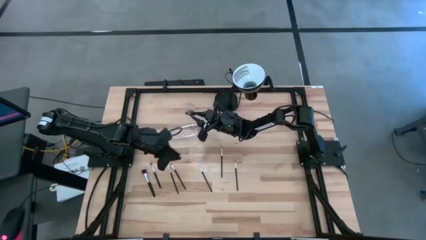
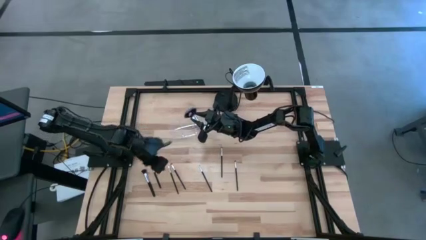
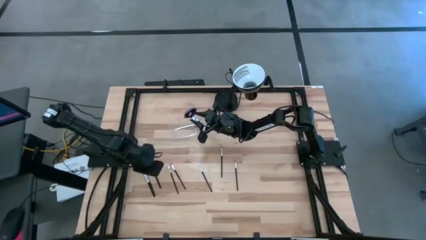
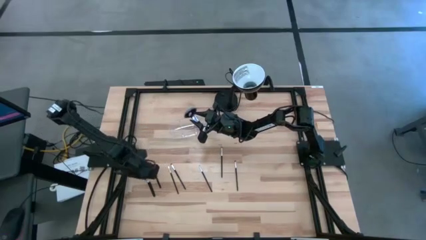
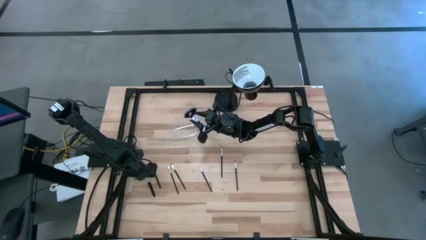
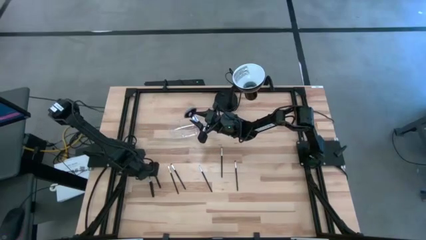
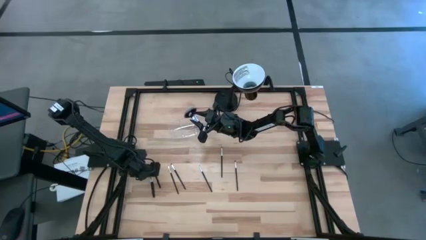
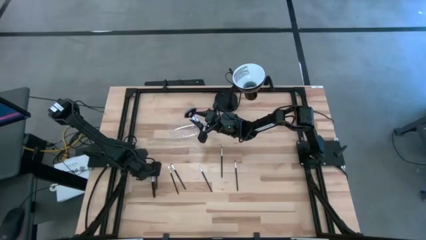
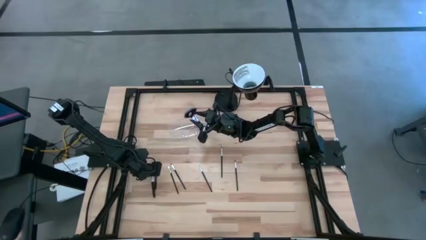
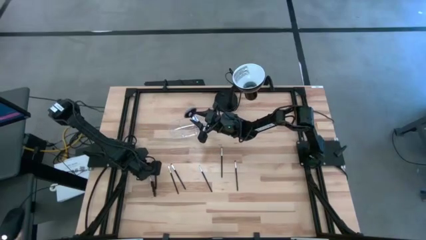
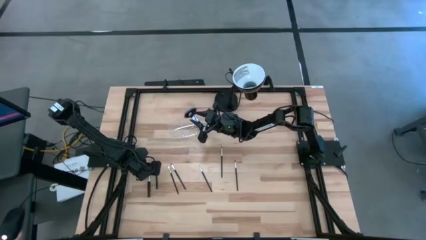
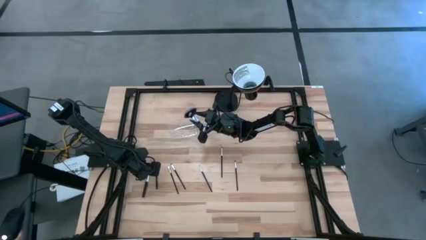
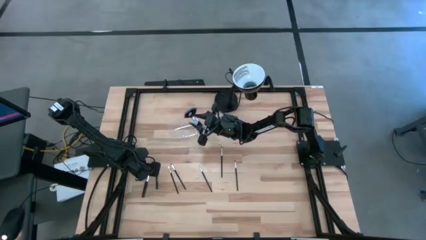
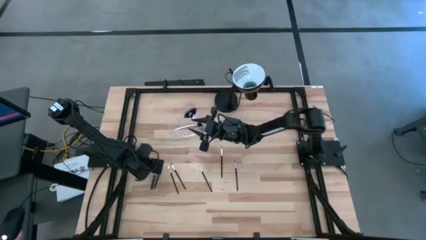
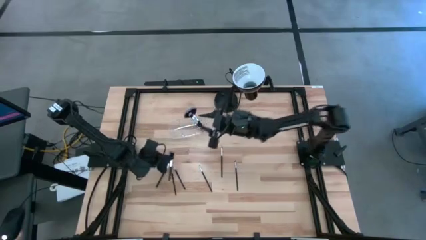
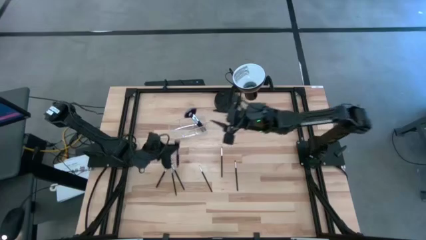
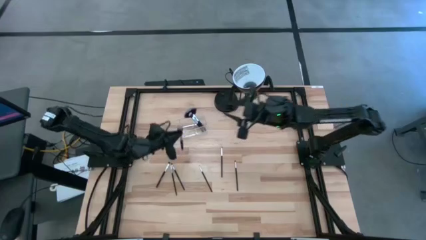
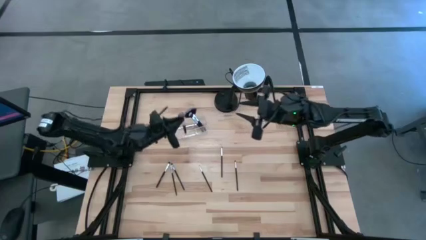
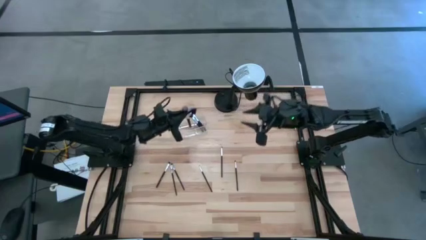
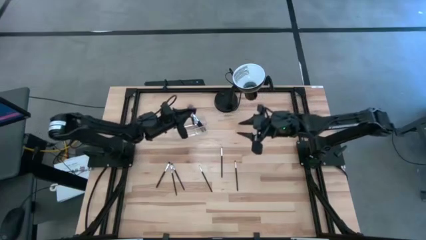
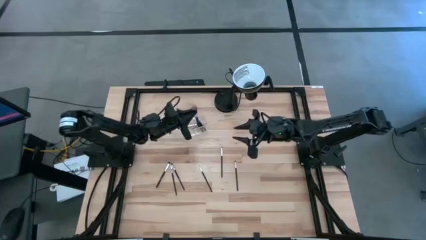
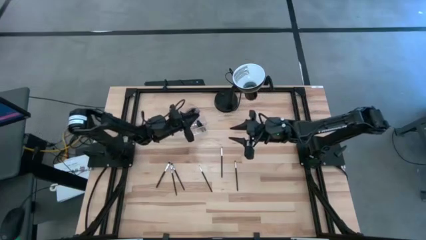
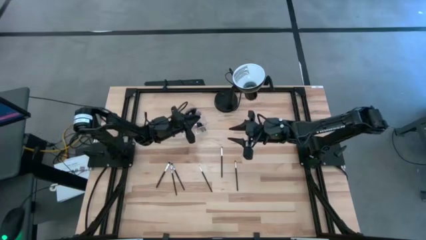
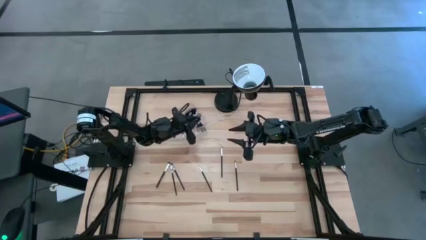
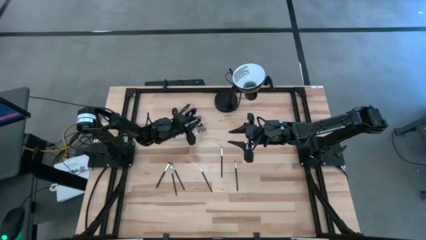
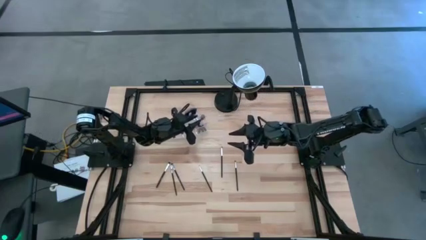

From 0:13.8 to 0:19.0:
Task: Put items in baskets/containers
Put the black powder brush into the transparent organizer

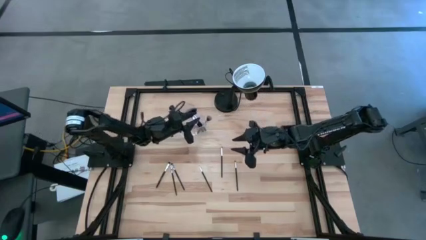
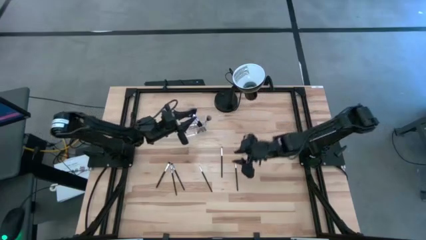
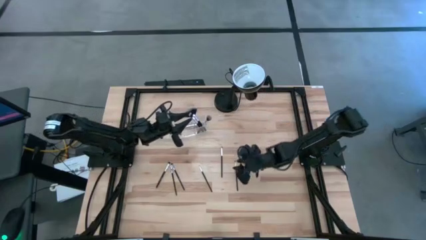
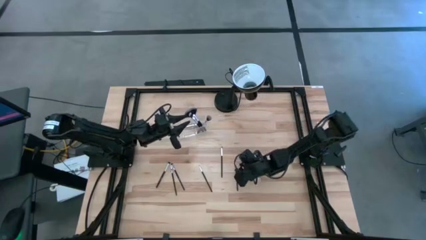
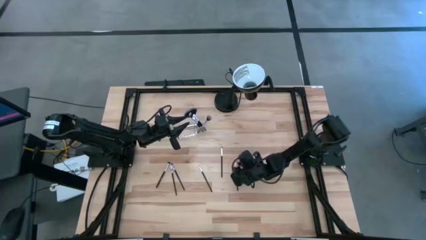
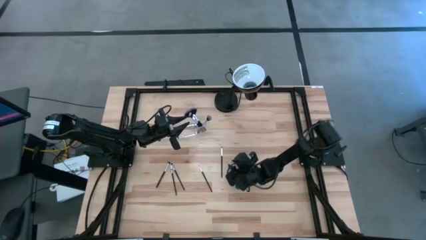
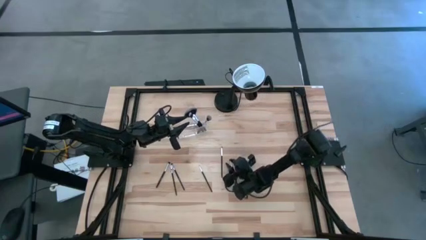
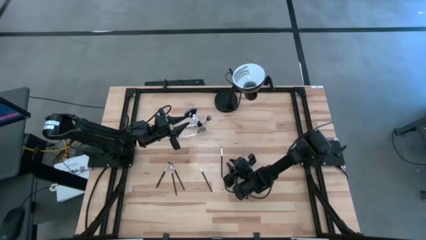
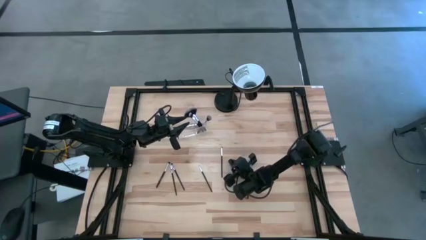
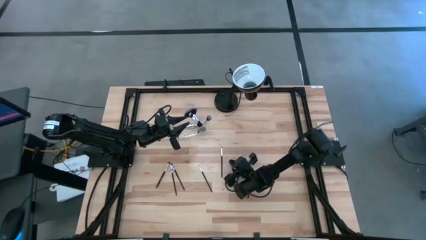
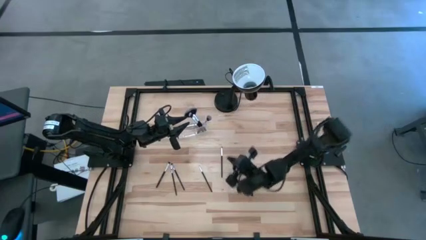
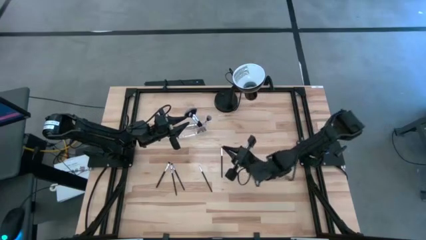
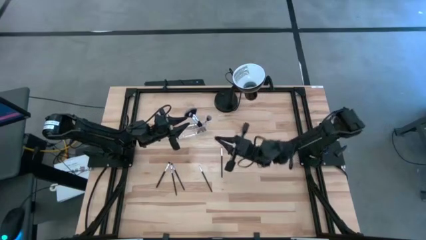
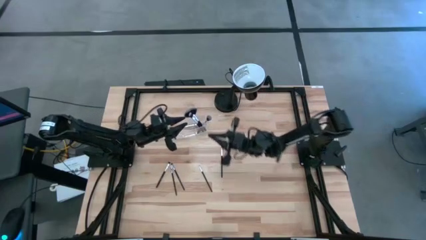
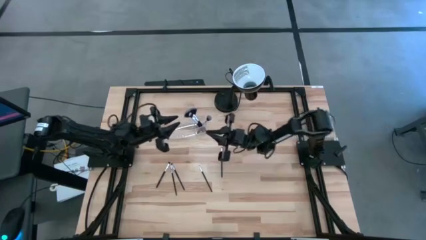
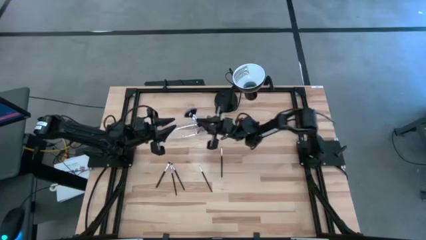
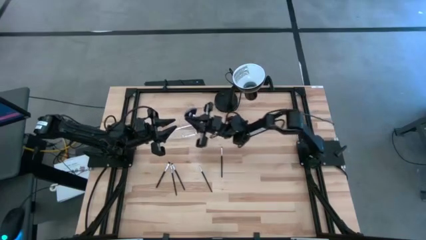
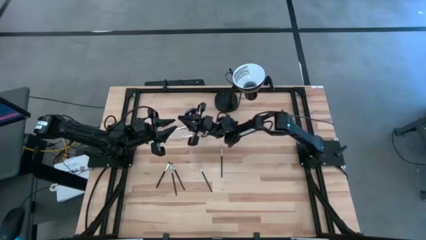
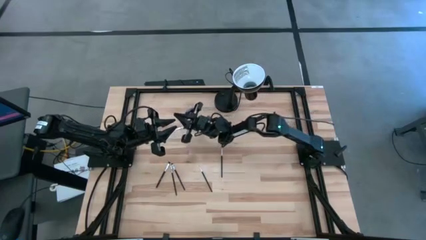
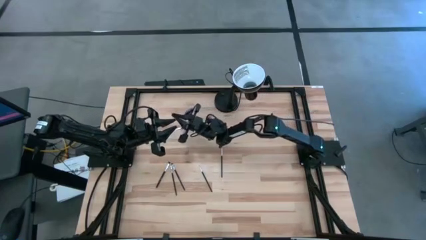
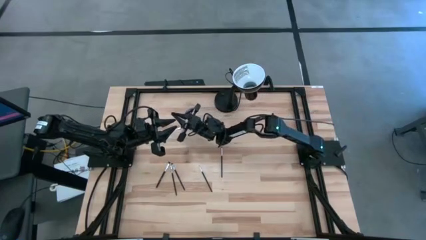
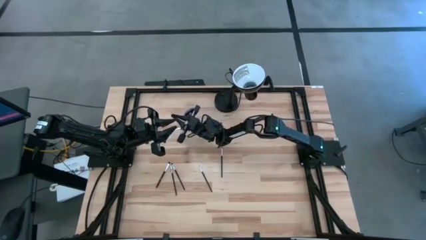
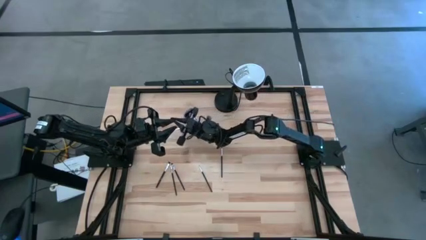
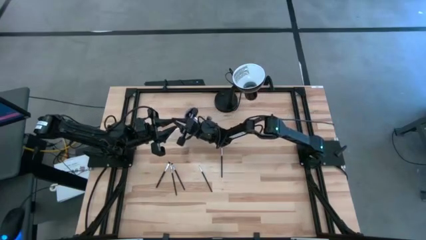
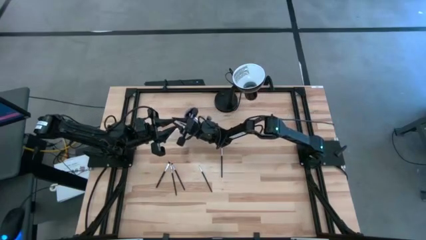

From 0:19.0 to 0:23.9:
Put the black eyeshadow brush into the transparent organizer

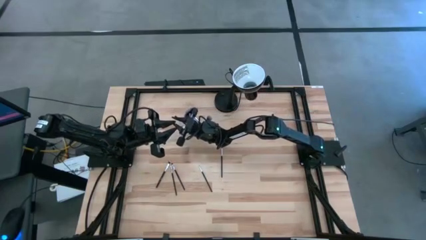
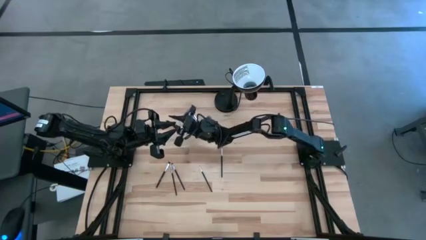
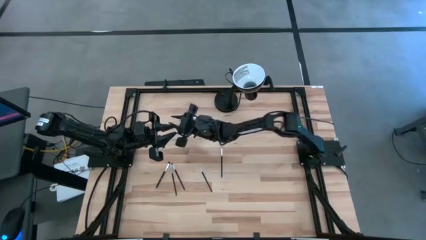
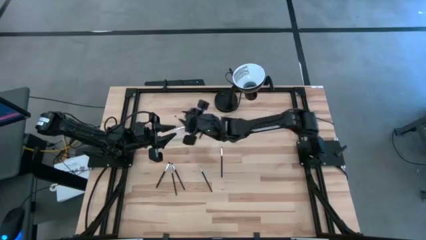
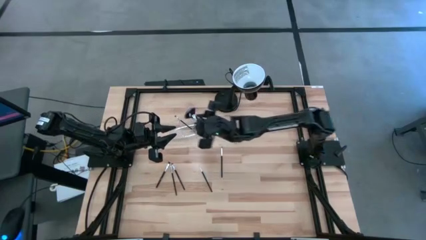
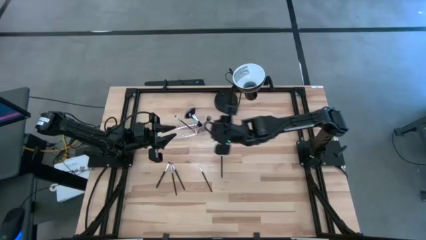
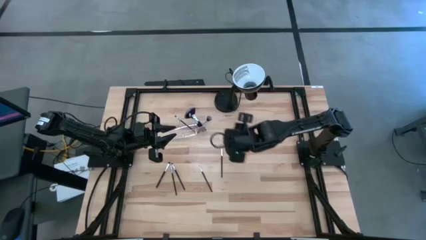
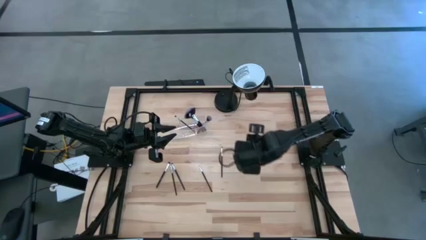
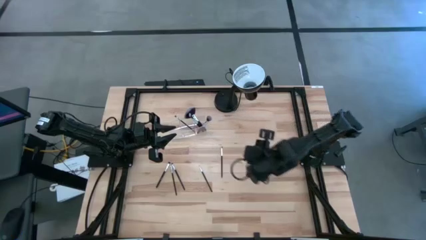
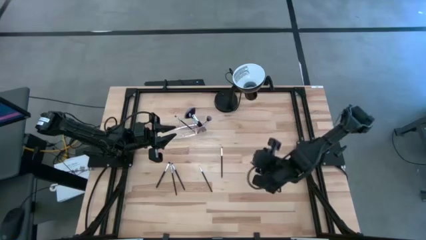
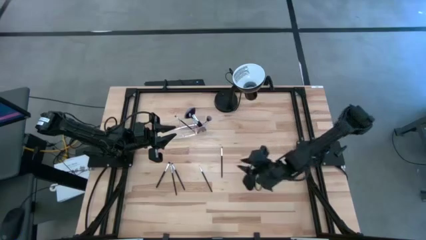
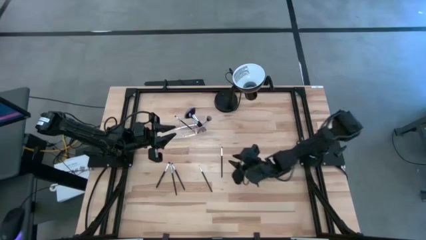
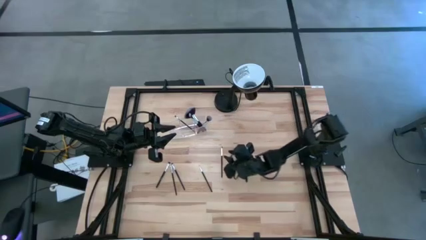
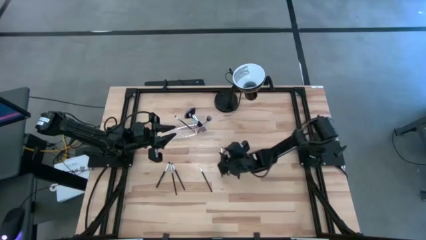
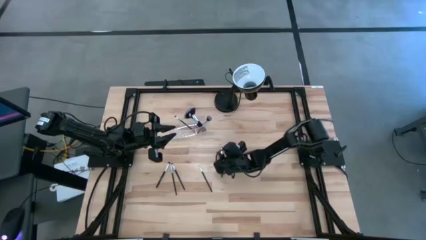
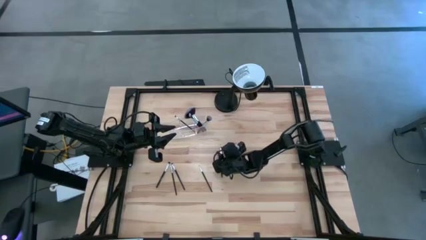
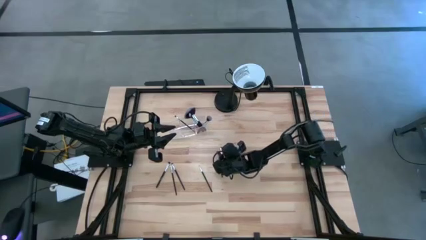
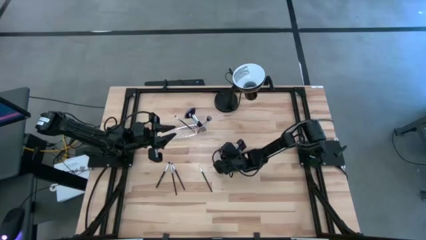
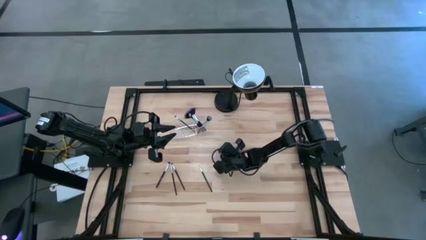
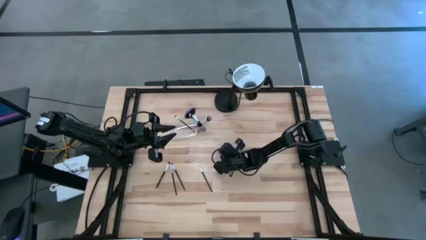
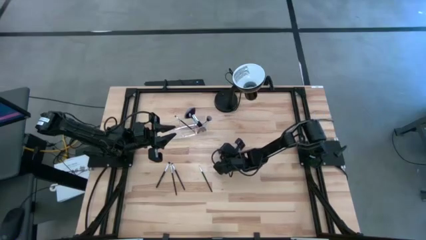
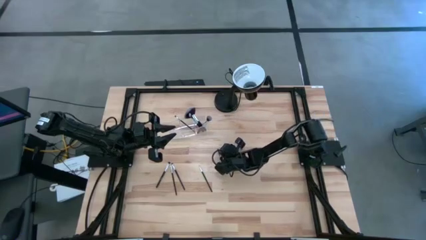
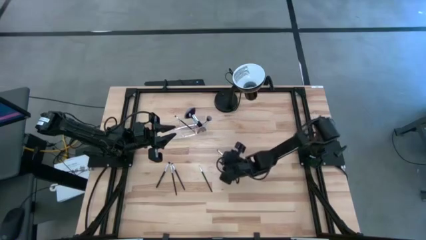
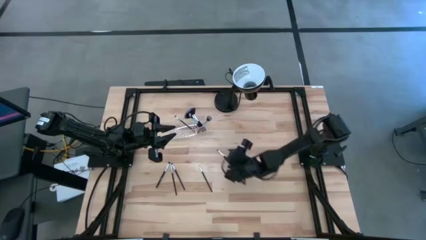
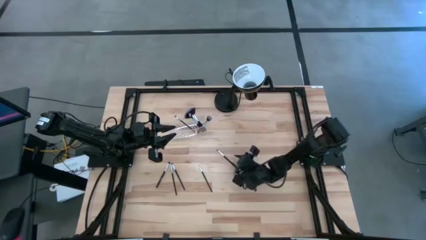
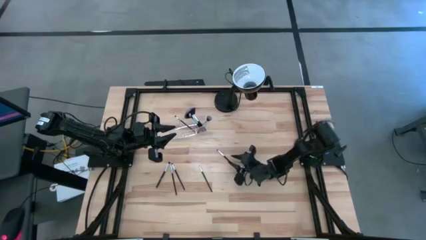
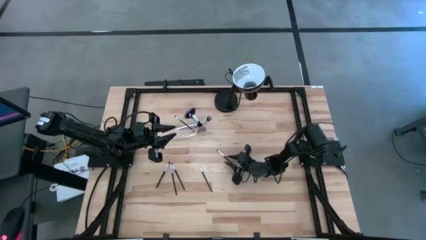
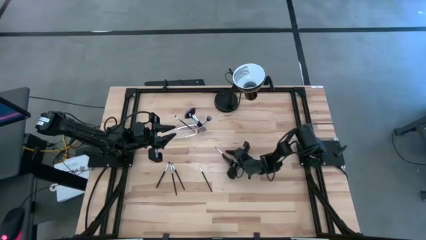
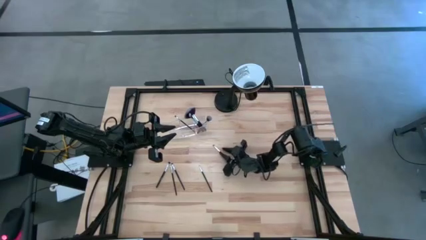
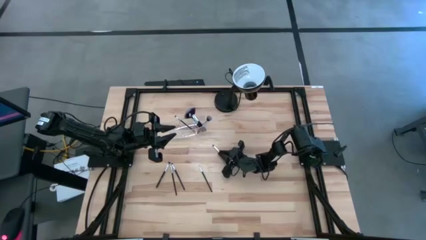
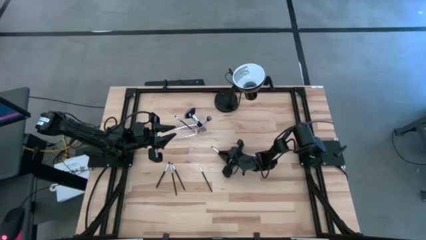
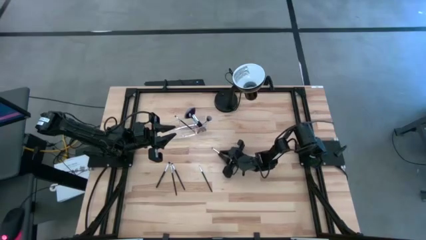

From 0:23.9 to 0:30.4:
Put the black eyeshadow brush into the transparent organizer

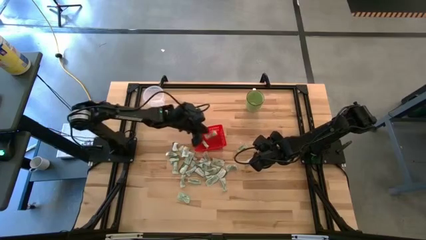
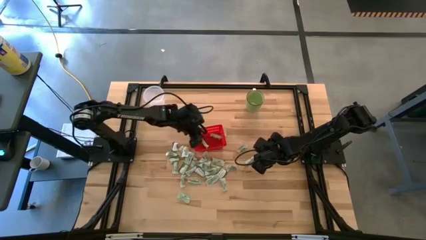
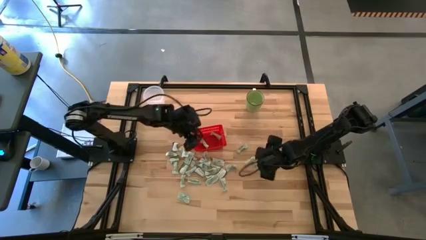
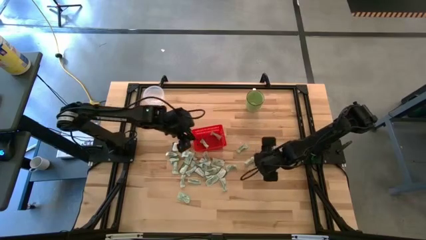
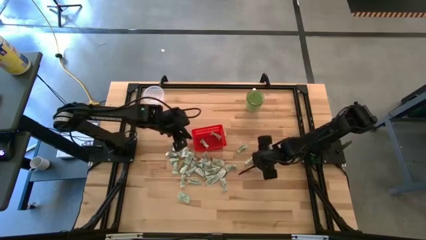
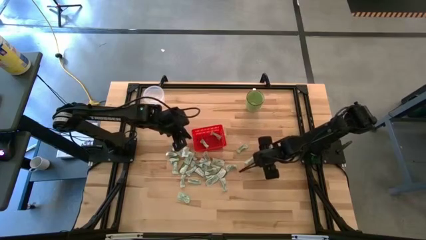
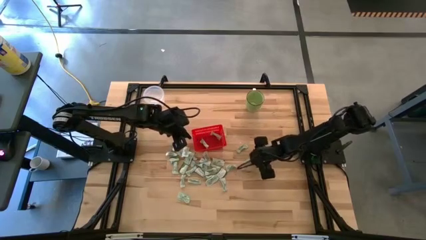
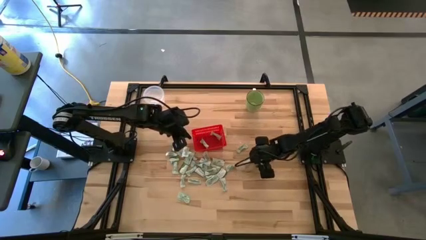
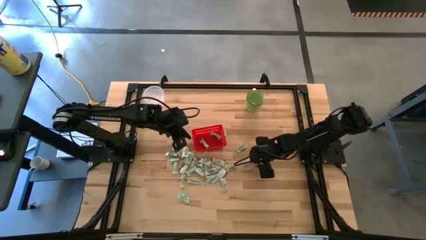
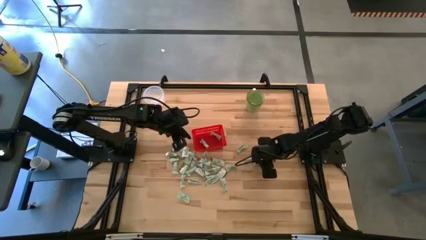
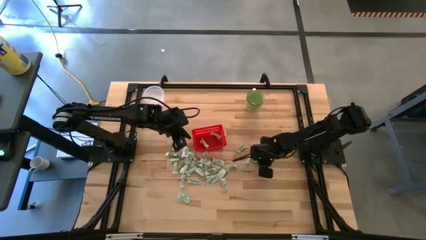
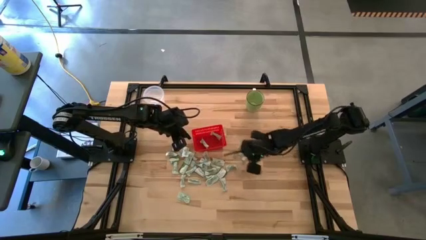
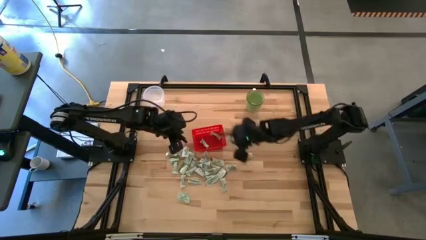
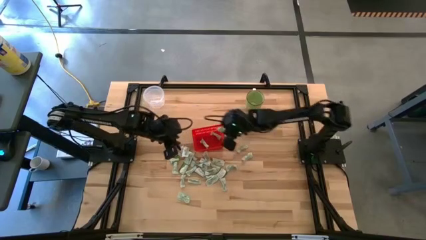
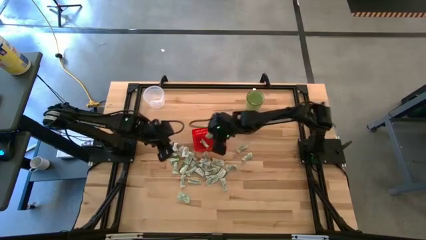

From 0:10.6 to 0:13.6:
Task: Pick and place Stevia / Truvia into bins
Put the stevia packet into the red basket
